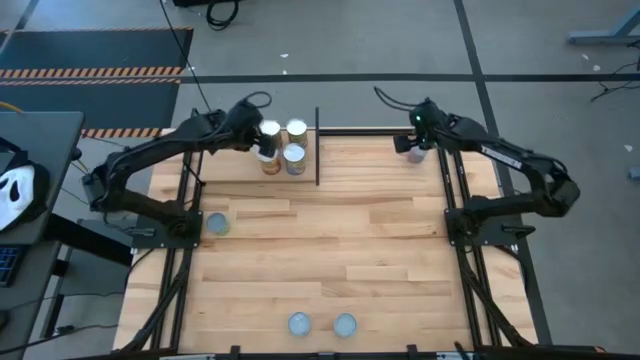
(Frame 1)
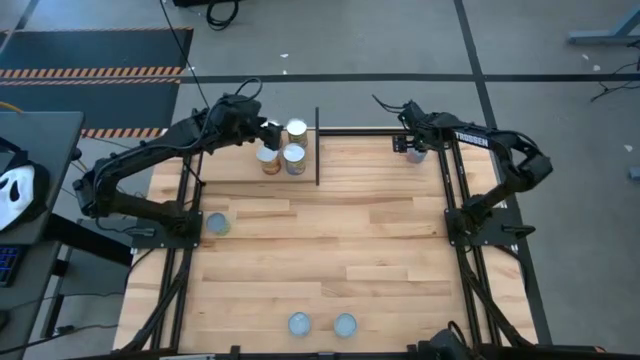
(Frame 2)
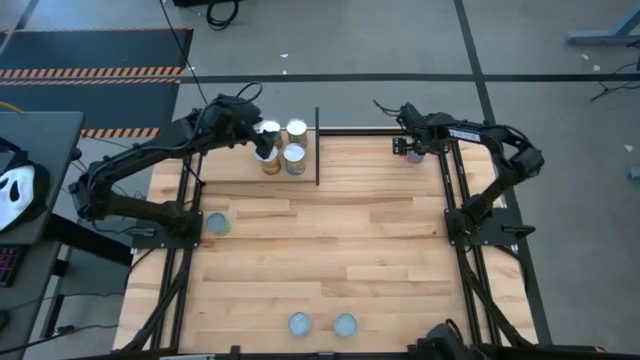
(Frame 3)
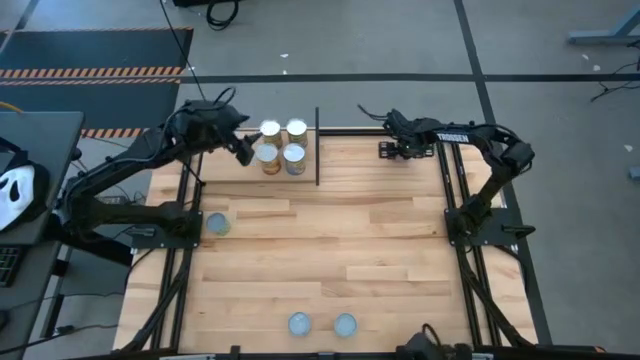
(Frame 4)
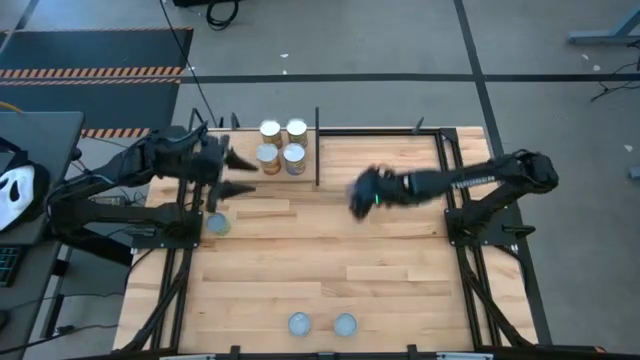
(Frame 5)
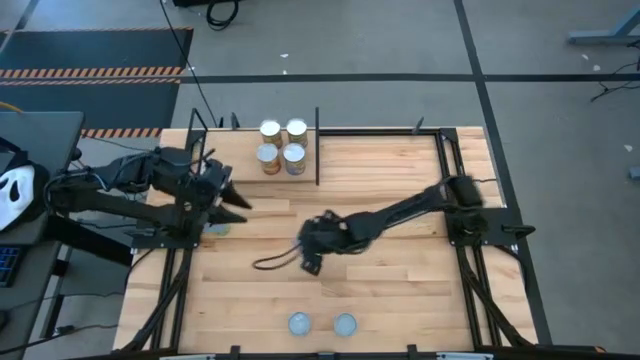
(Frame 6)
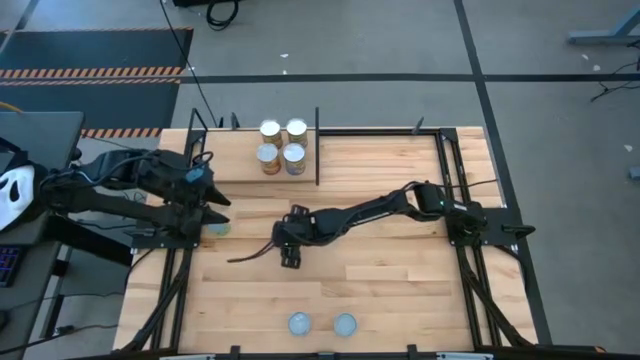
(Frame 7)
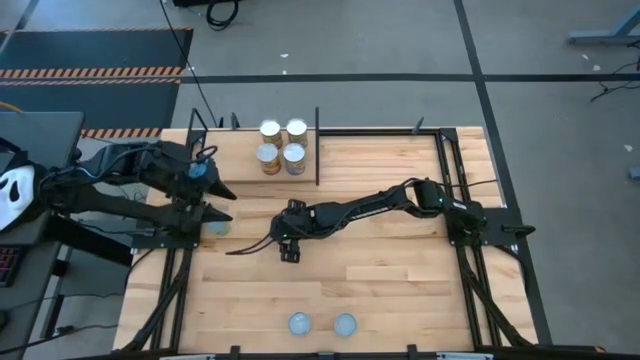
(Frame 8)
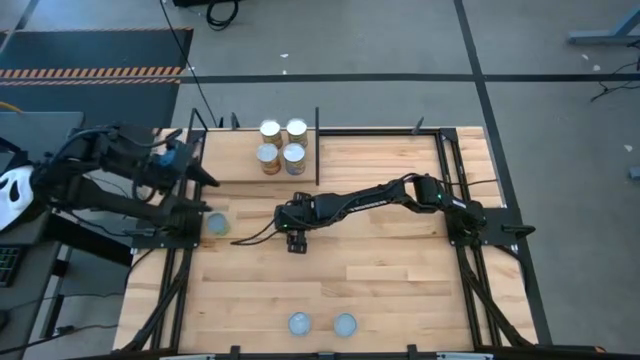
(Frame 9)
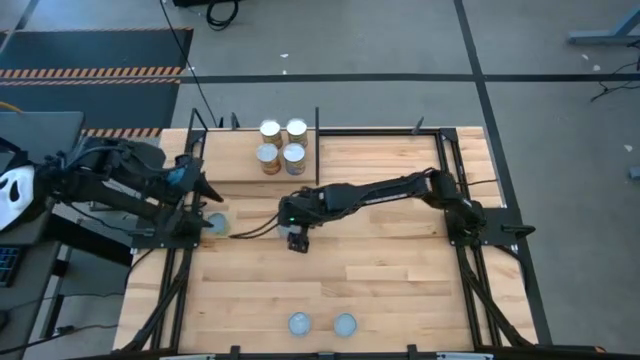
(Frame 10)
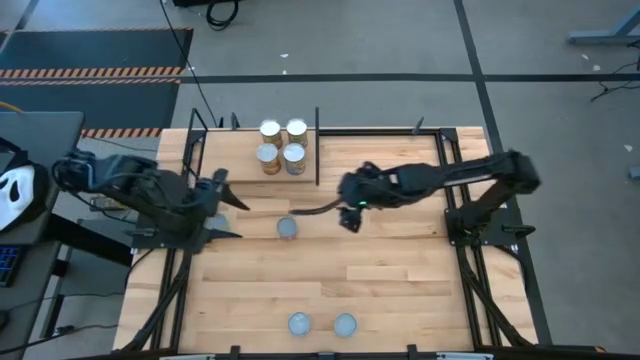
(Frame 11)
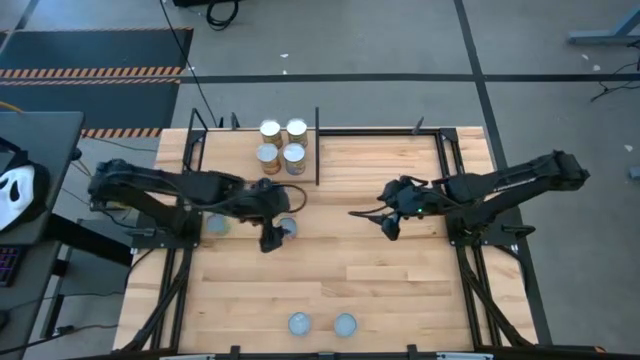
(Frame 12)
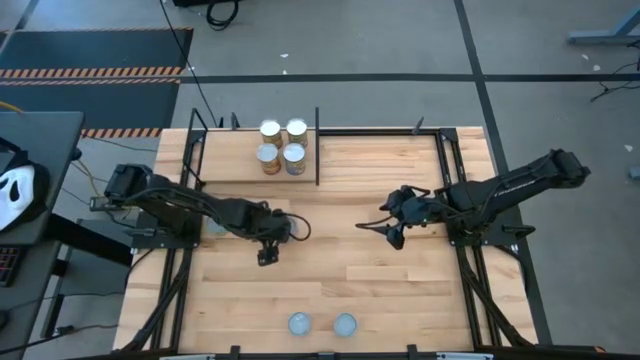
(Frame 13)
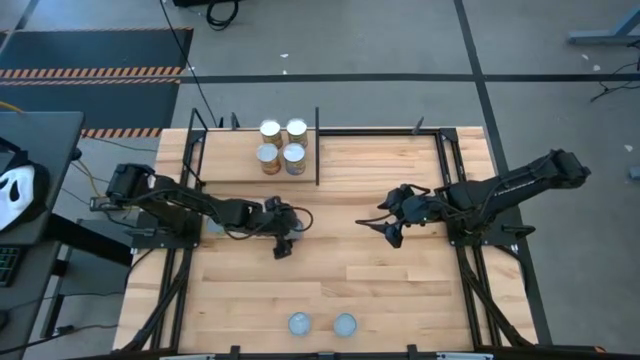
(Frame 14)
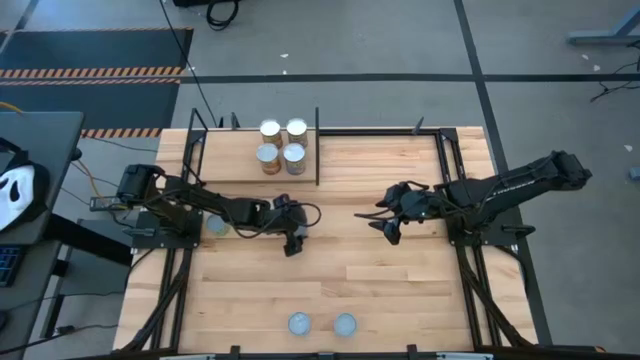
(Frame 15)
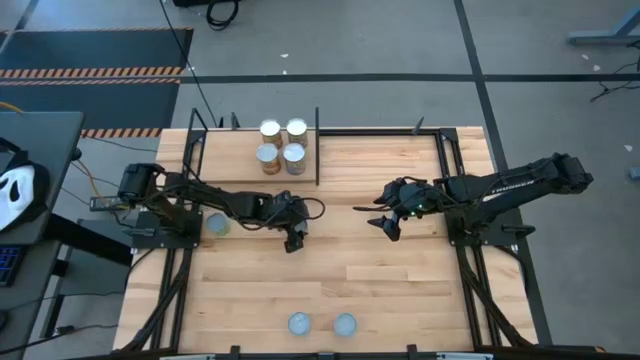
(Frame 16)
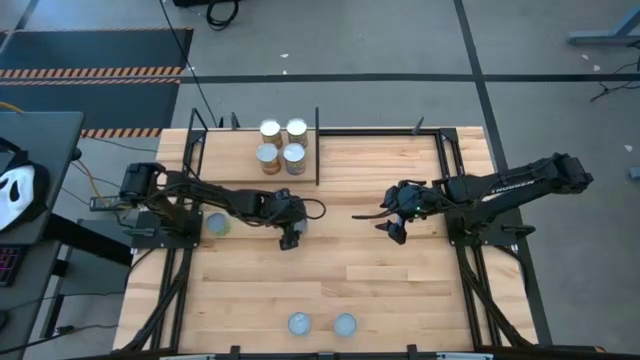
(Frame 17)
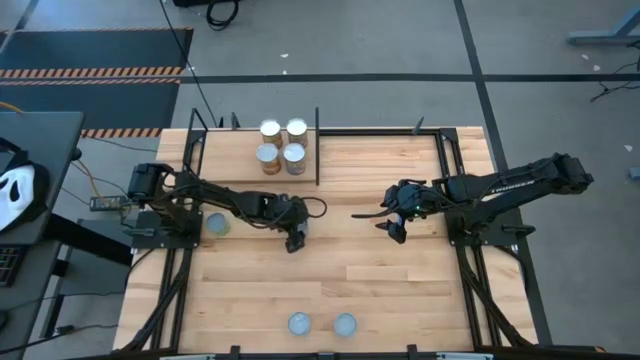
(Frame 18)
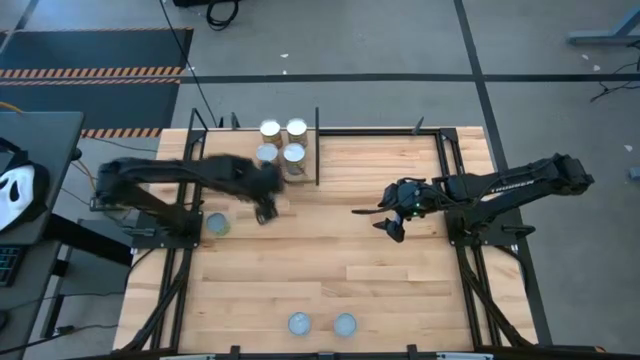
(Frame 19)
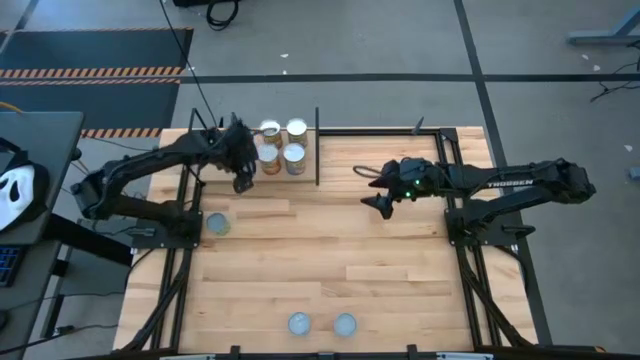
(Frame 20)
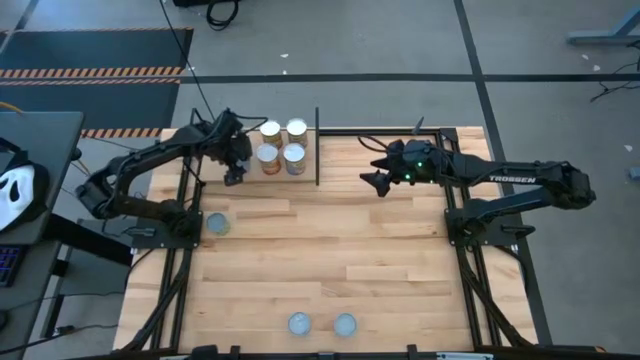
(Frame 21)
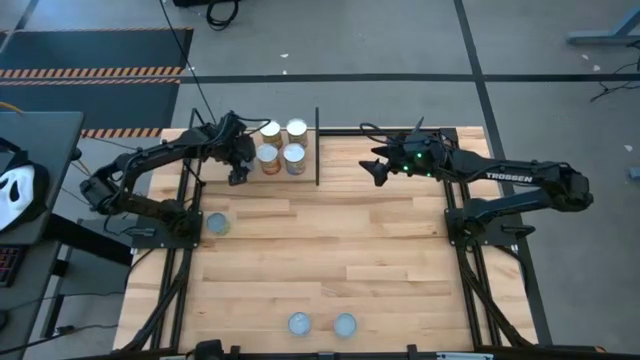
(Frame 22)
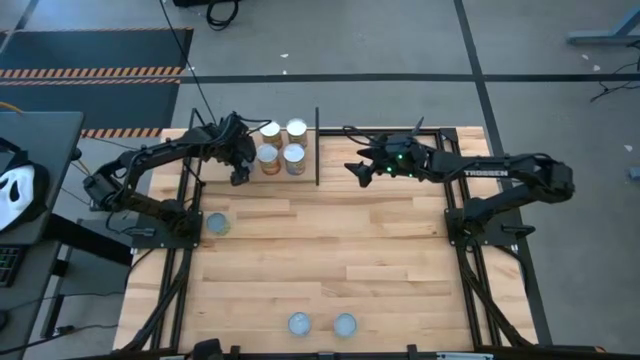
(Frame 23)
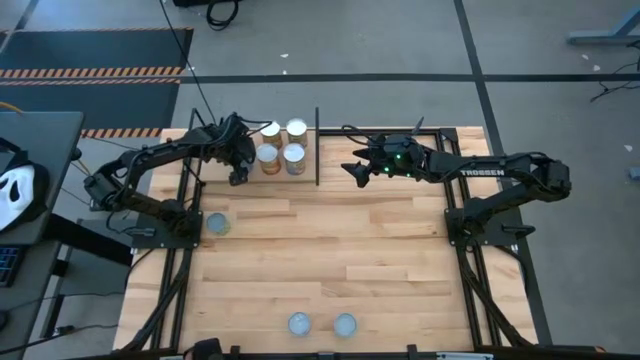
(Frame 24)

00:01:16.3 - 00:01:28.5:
Task: Pick and place cans onto a shelf
Put the canned mixed corn on the shelf

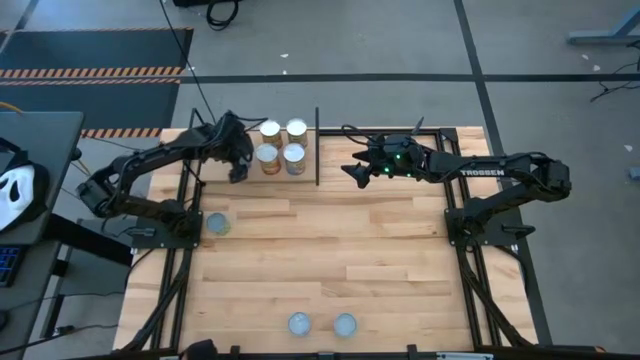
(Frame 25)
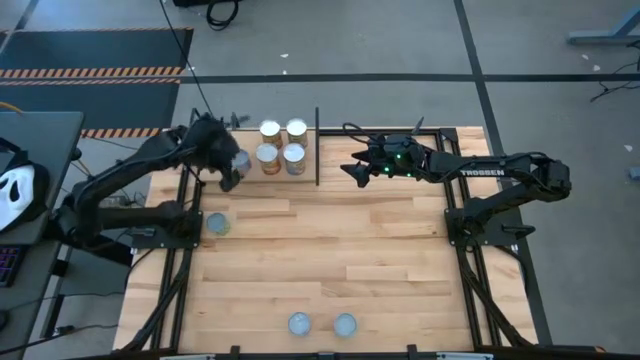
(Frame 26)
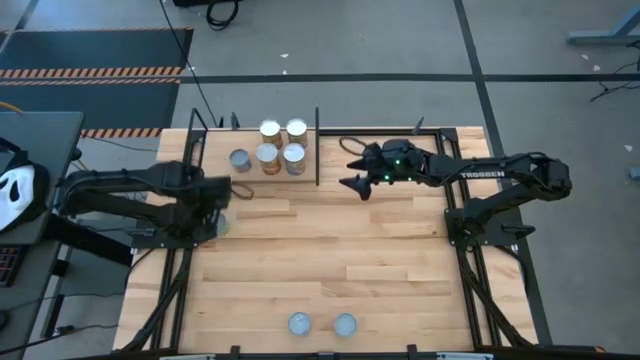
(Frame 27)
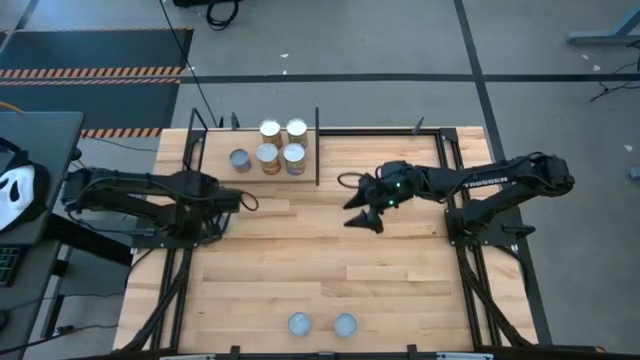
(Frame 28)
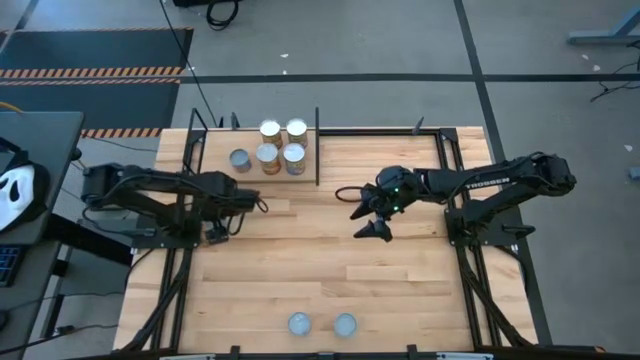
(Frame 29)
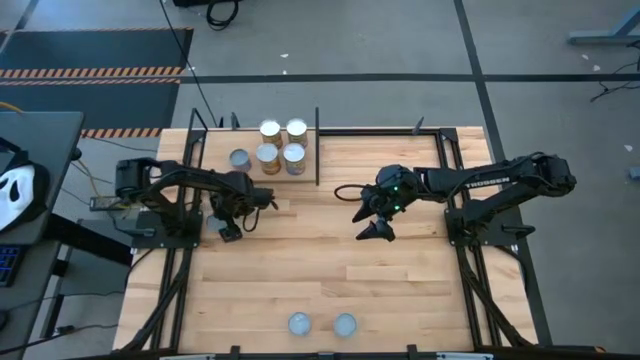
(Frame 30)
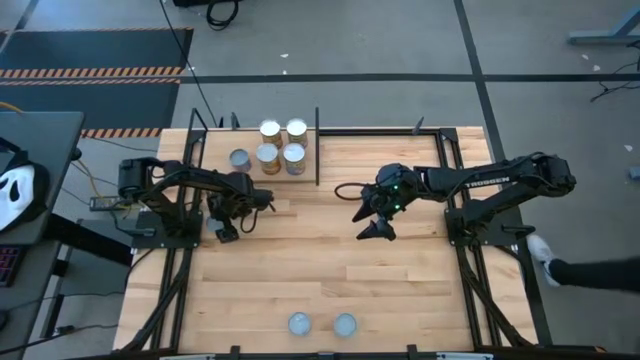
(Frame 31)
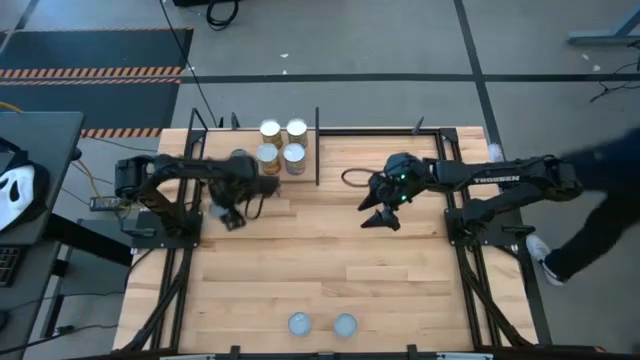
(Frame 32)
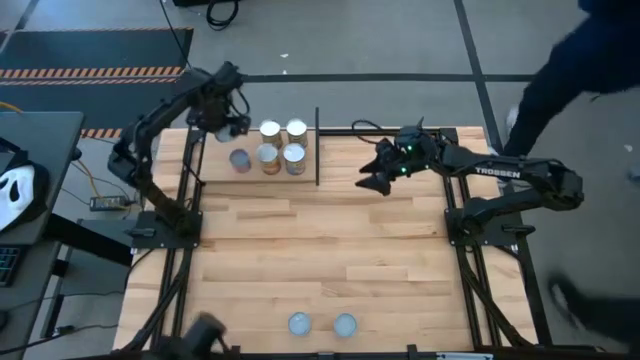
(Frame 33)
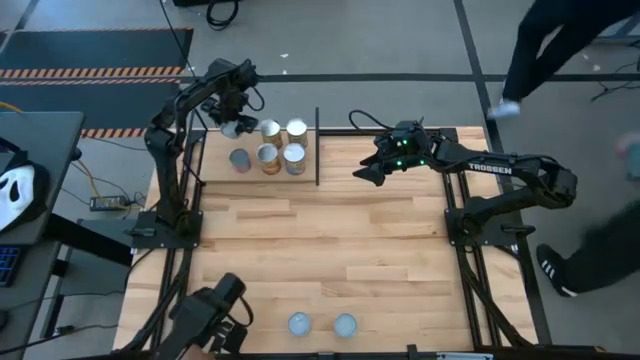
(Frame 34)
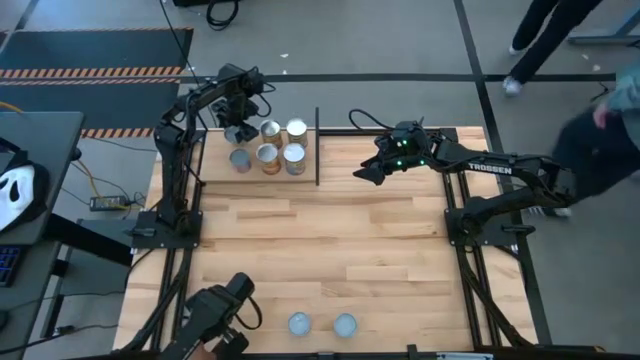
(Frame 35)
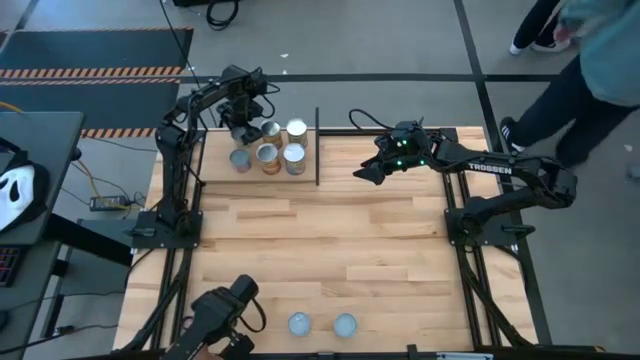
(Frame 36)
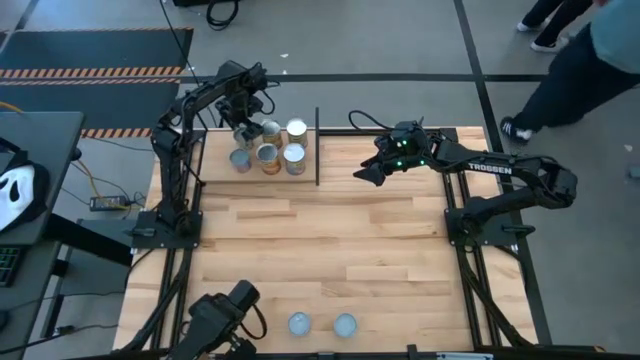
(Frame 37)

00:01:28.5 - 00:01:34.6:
Put the canned green peas on the shelf

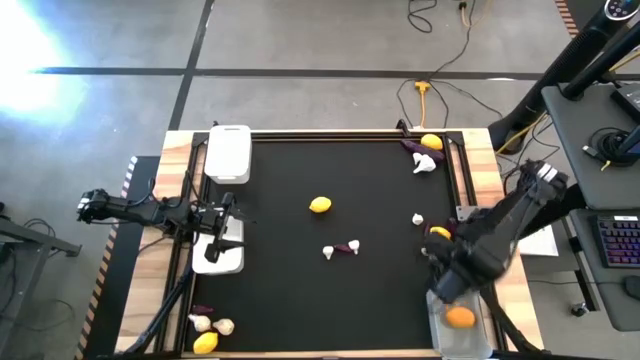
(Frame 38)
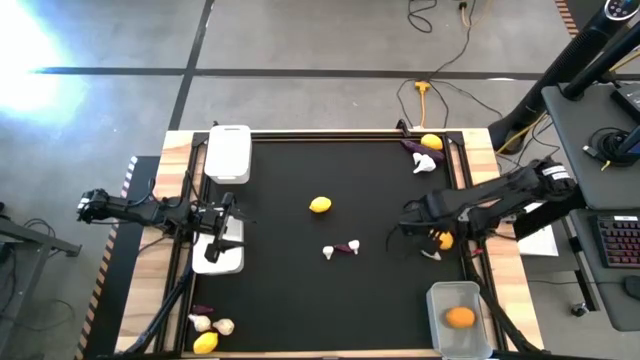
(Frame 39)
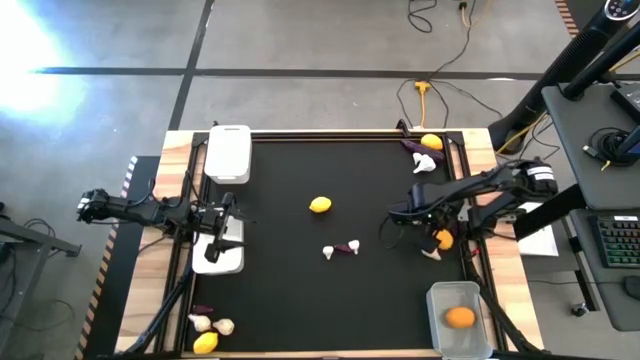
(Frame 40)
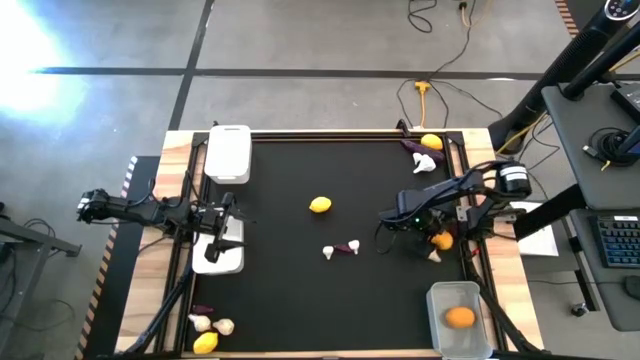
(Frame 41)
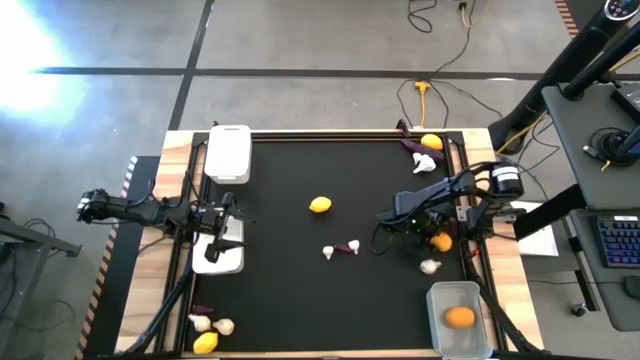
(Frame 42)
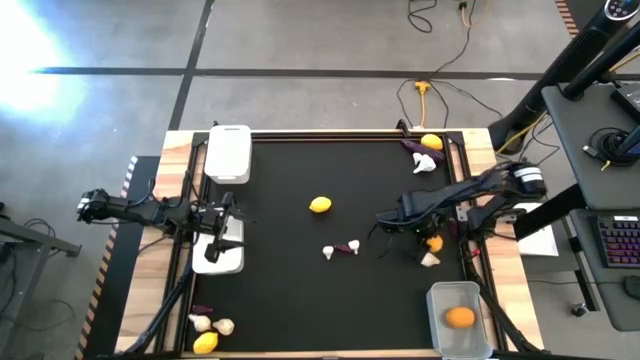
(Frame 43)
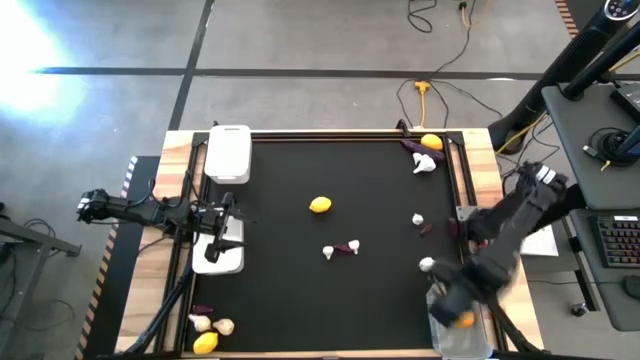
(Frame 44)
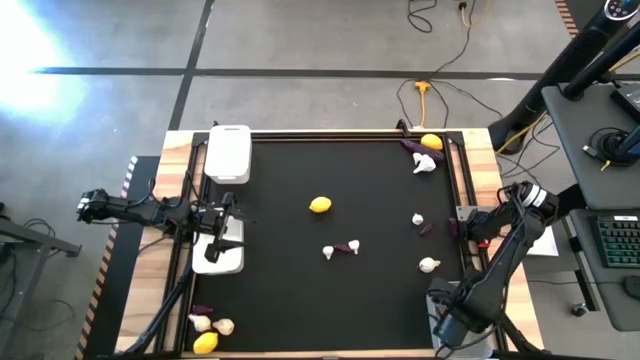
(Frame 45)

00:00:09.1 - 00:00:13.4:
Task: Sort produce into baskets
Put the lemon into the gray bin
